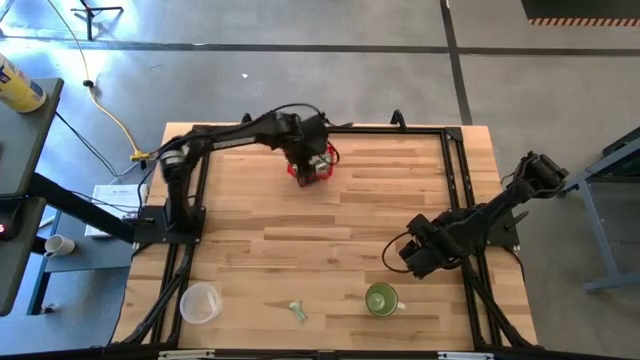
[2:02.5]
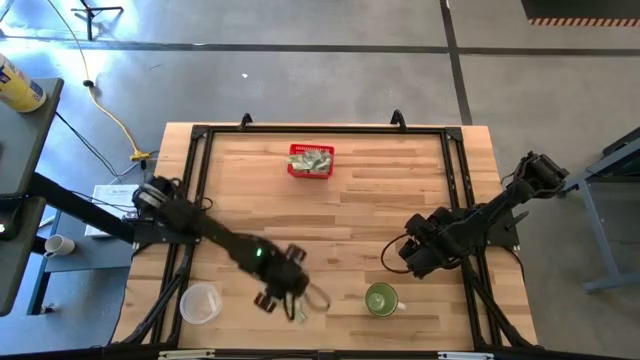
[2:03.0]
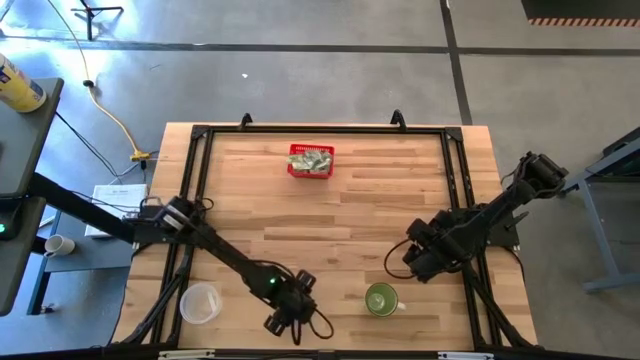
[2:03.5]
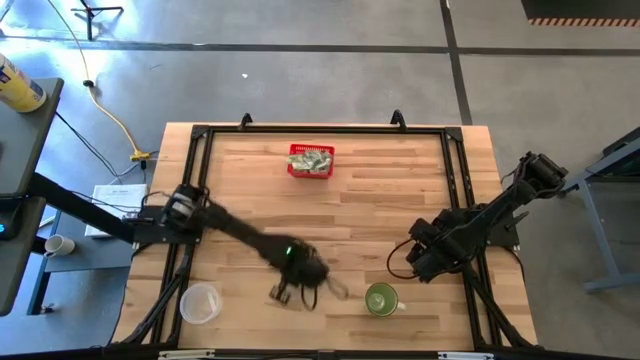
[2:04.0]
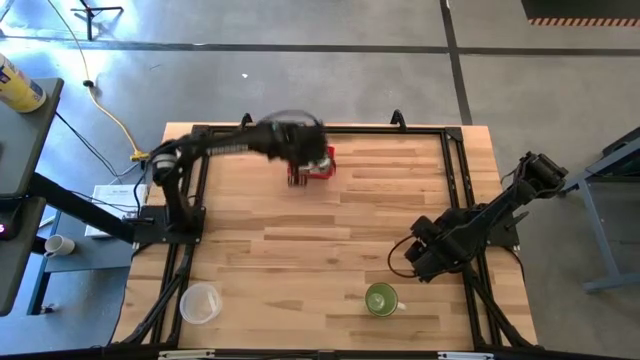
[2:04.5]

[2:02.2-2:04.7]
Task: Pick and place items into bin
Put the light green stevia packet into the red bin

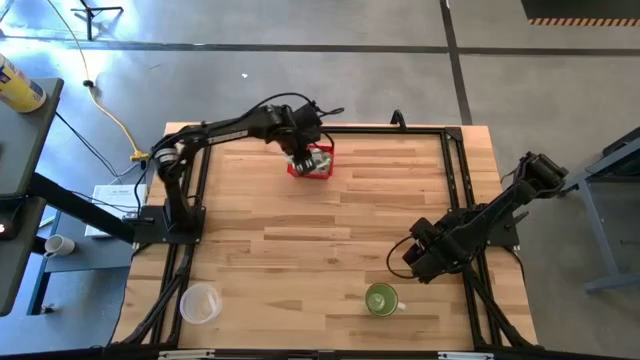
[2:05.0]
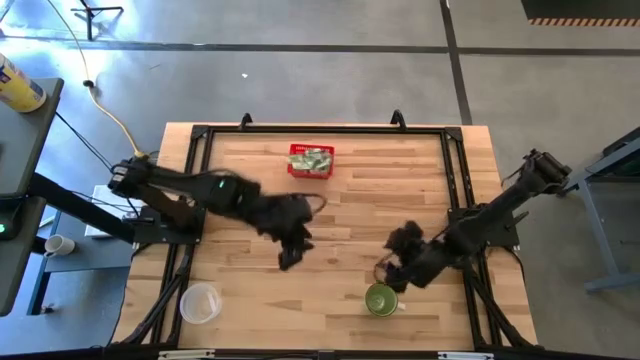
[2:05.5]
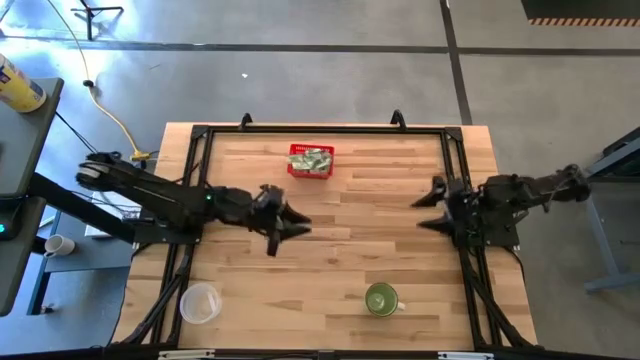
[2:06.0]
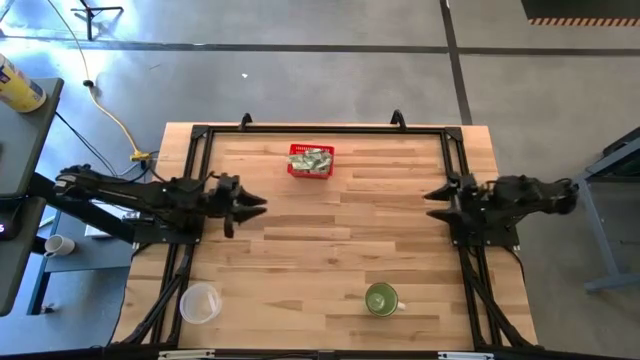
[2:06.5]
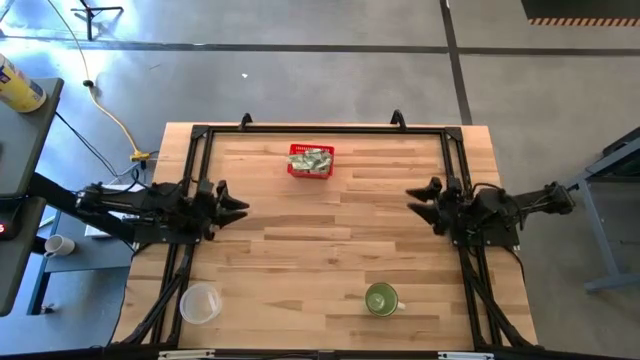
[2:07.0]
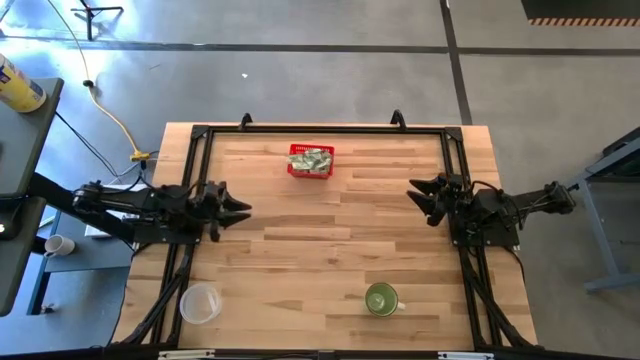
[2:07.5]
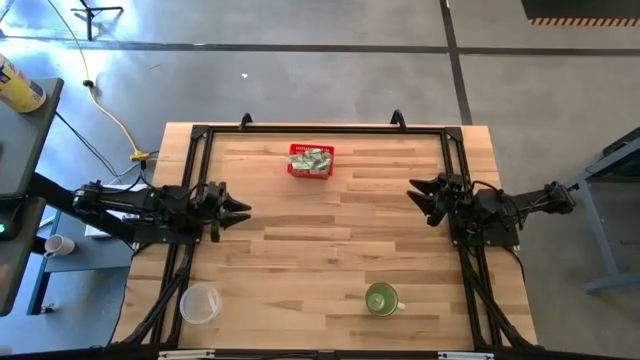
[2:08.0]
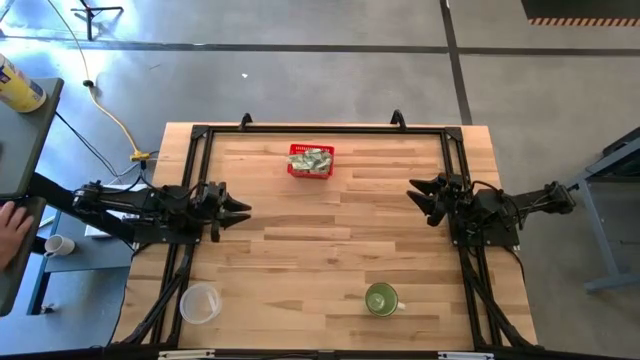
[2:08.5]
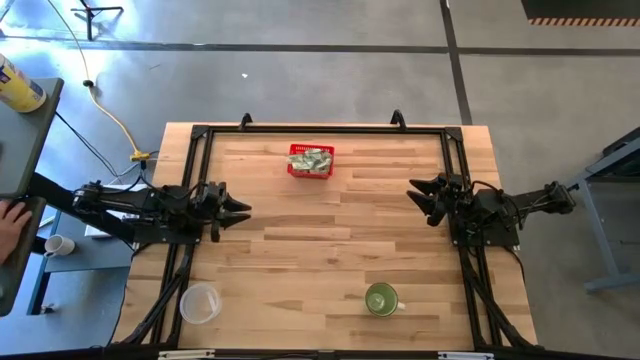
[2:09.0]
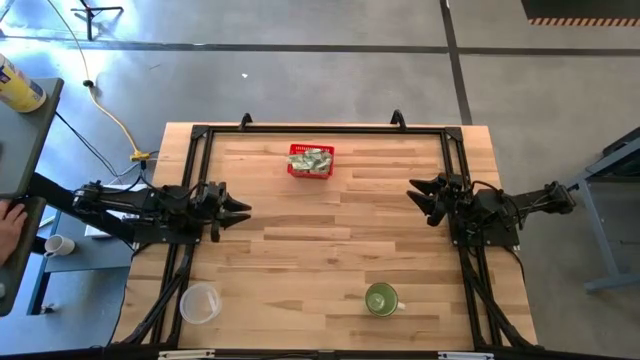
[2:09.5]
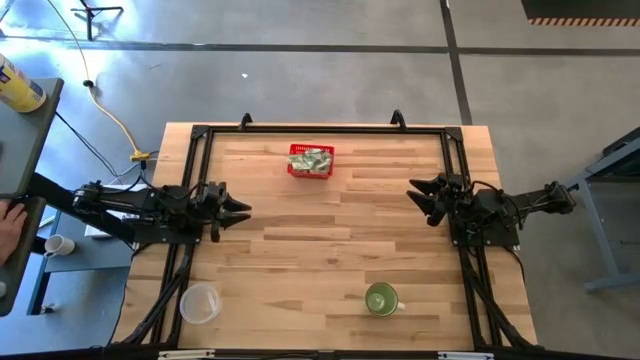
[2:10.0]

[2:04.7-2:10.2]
Return to Home Position

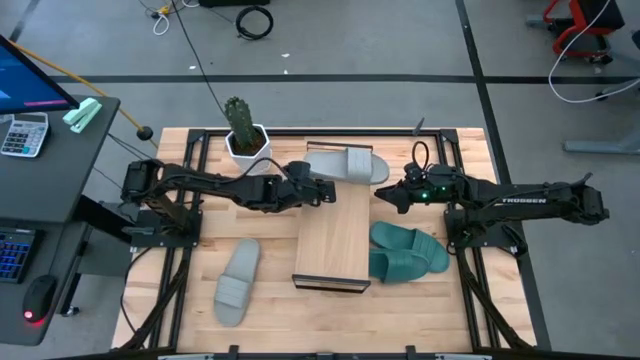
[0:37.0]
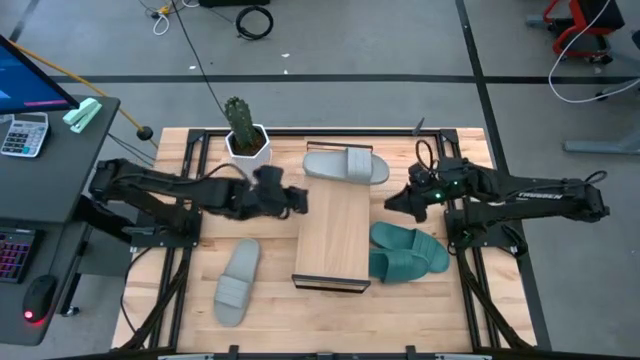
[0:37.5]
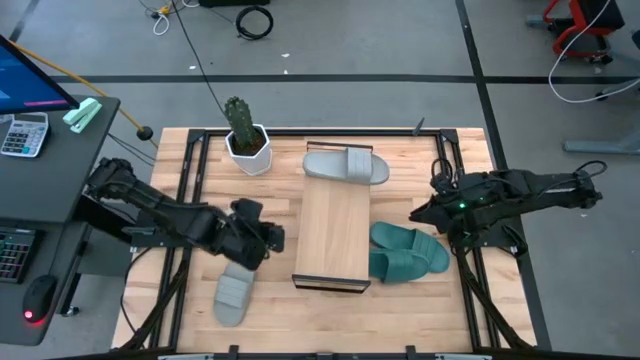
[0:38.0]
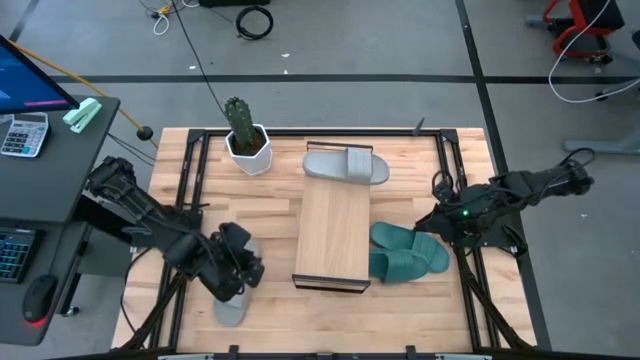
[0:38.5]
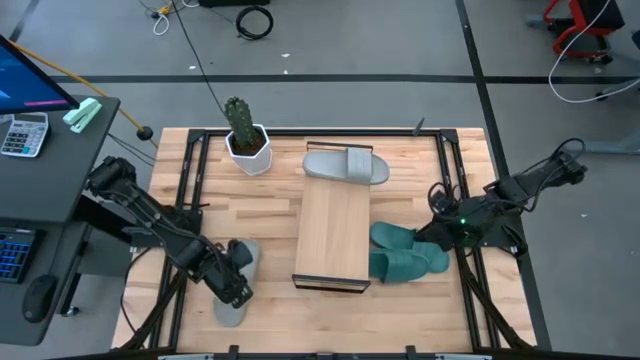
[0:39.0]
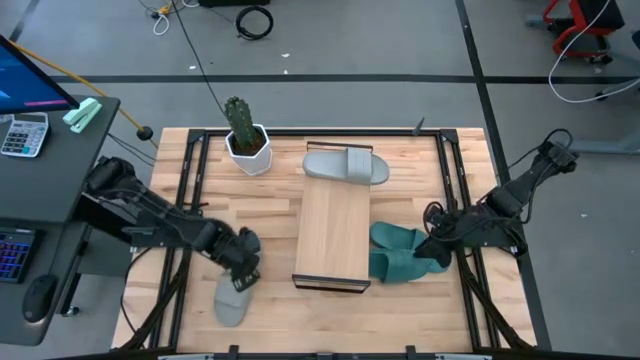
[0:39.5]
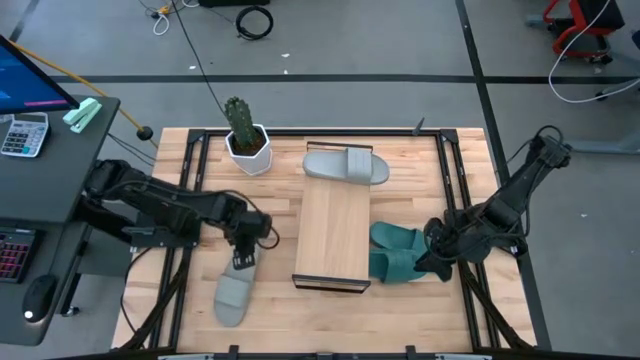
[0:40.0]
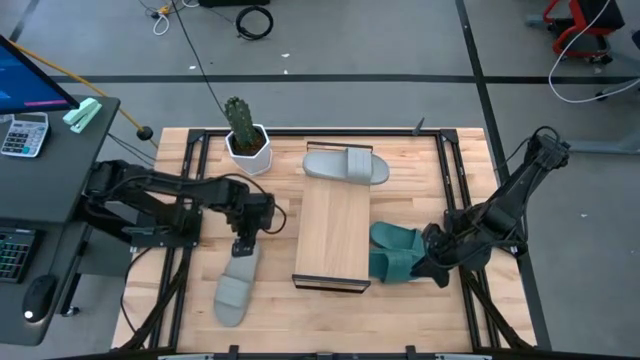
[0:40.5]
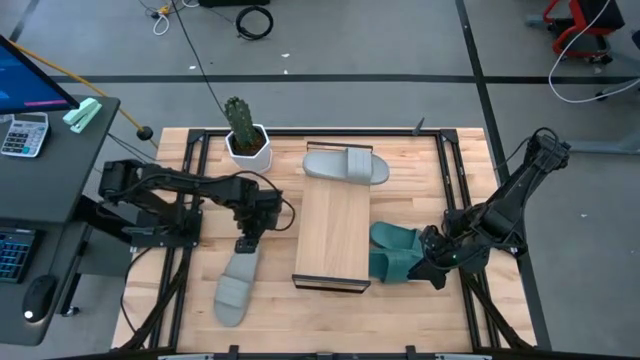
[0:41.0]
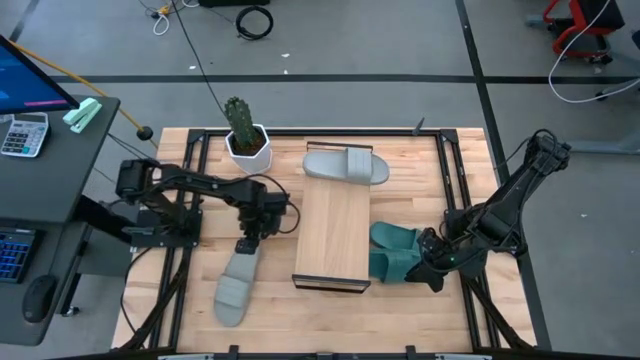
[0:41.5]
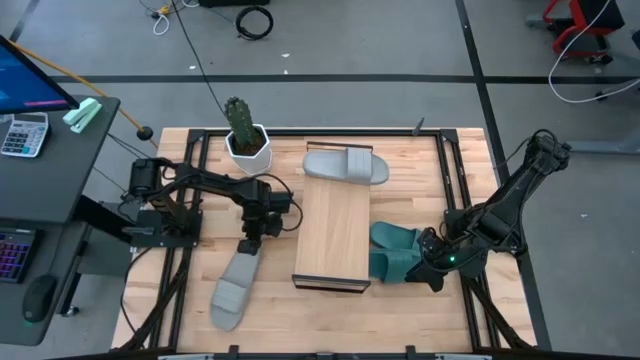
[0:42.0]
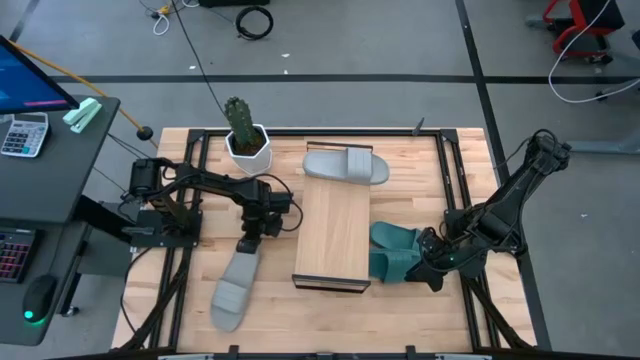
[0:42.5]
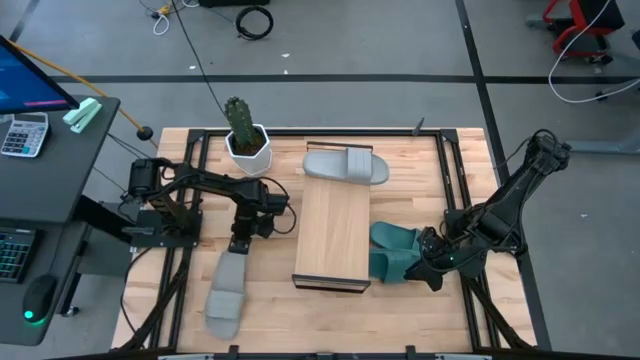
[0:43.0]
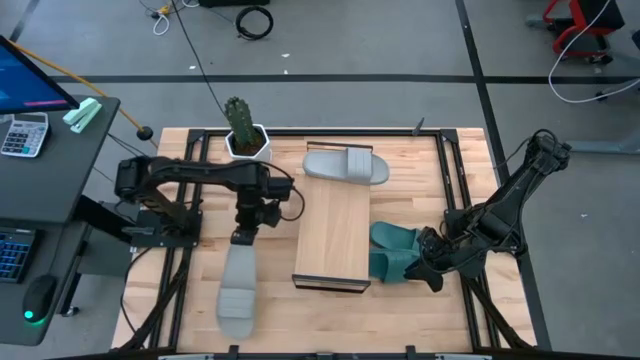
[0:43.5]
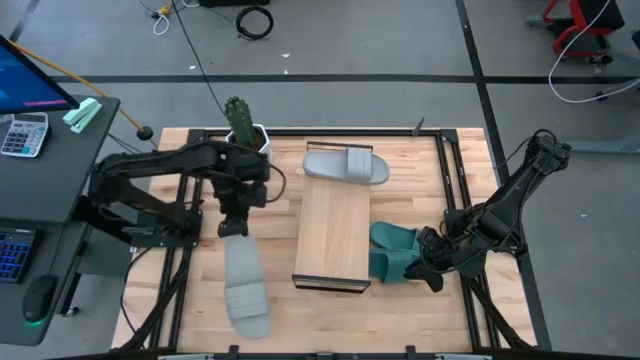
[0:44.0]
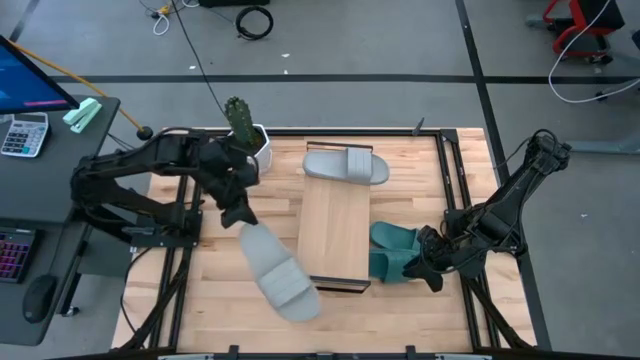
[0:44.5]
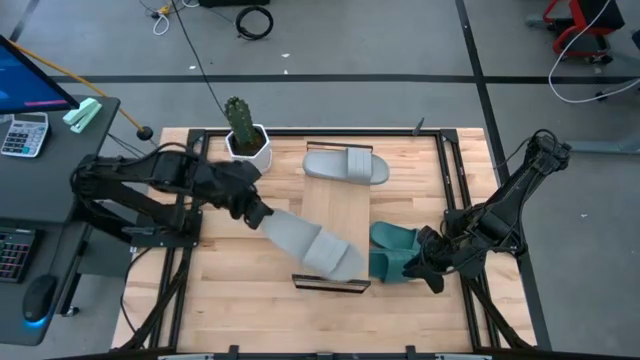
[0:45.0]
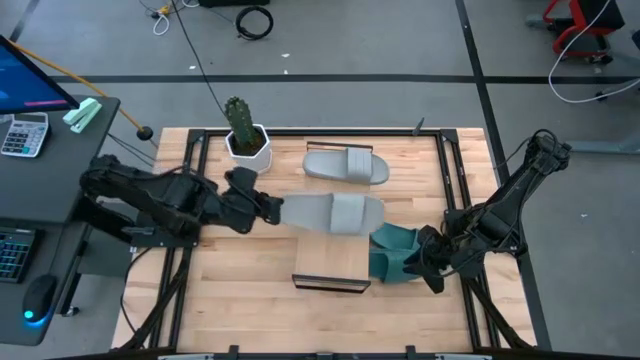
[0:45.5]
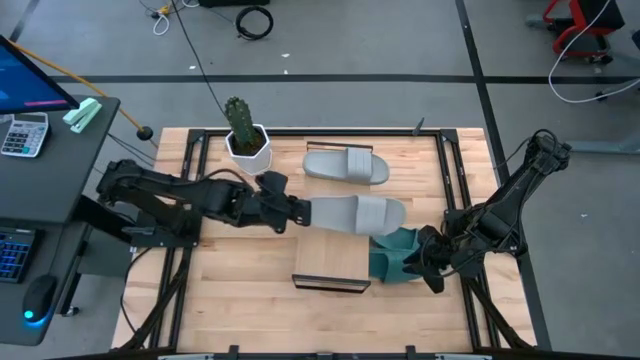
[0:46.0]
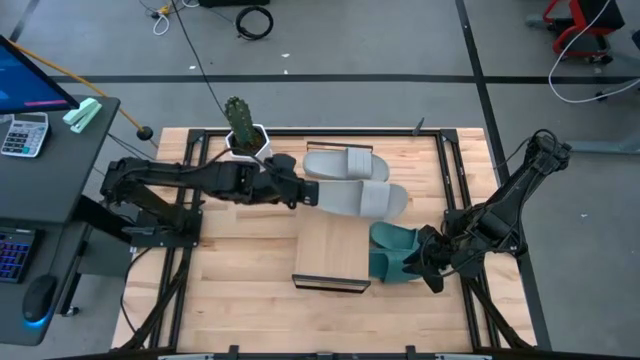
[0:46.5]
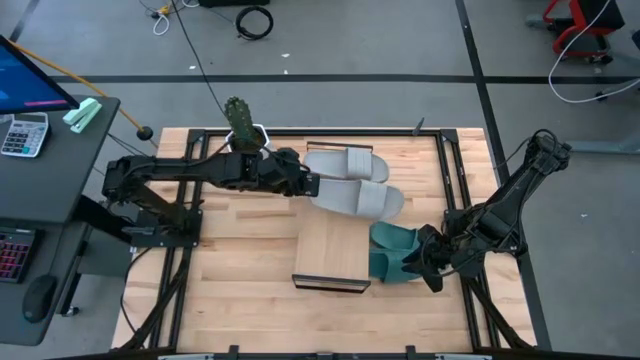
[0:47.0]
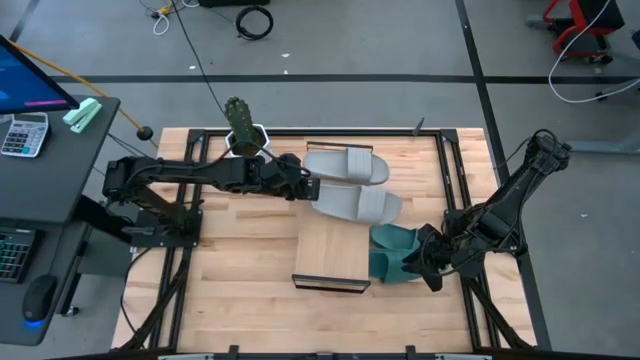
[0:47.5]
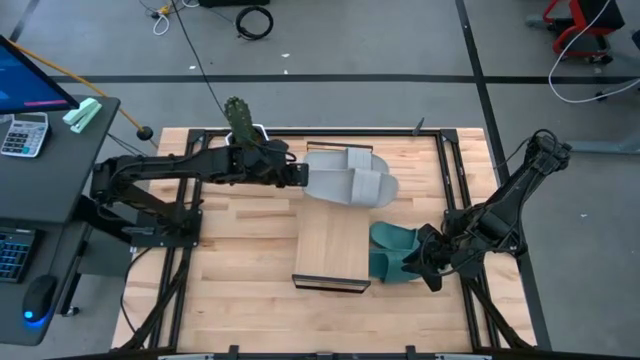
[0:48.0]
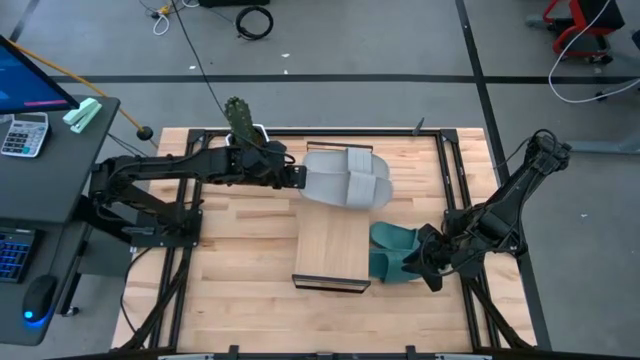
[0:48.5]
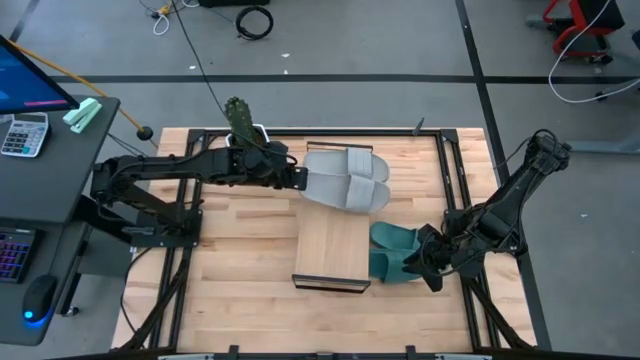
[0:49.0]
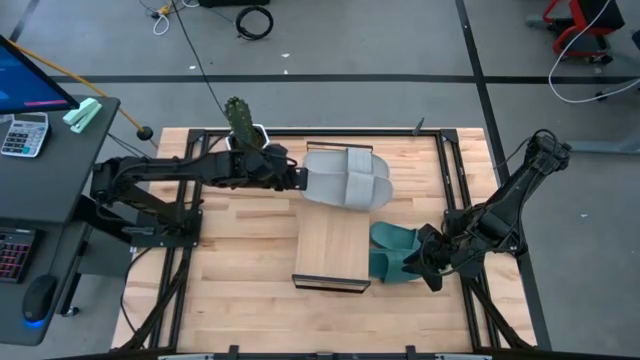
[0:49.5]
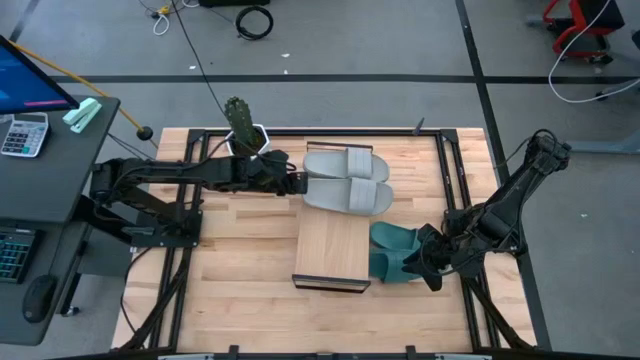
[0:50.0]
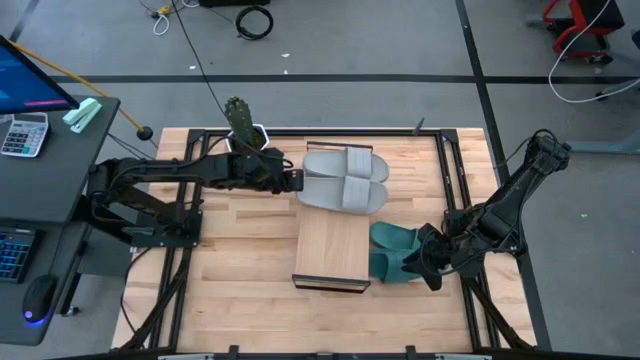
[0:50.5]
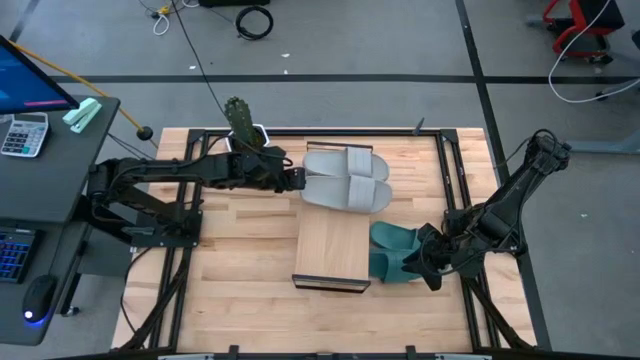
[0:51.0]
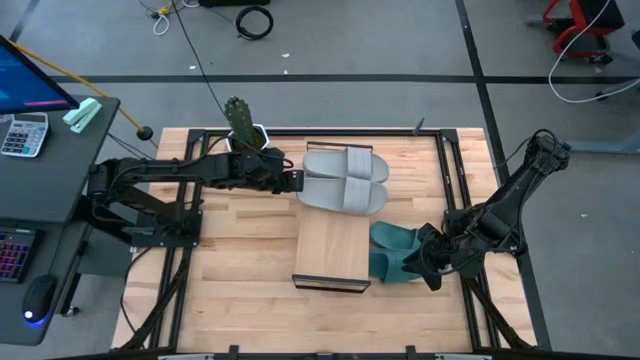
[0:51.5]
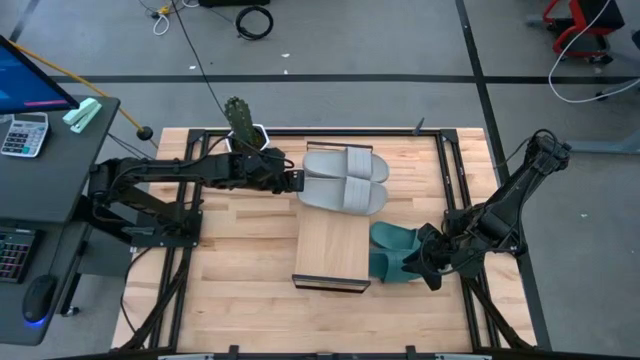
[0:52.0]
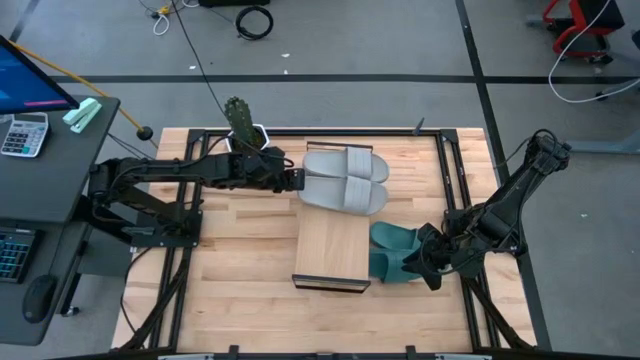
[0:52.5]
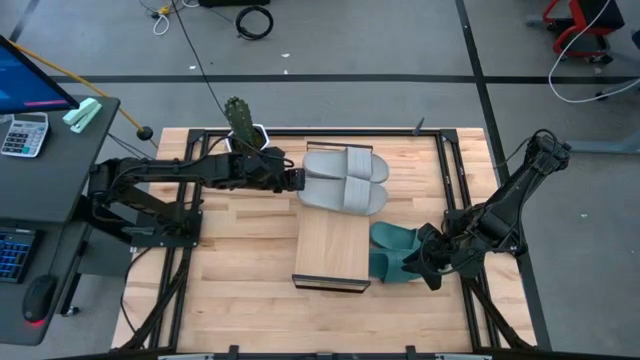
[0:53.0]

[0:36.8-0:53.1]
Task: Pick and place slides into the shelf
Put the gray slipper onto the shelf
